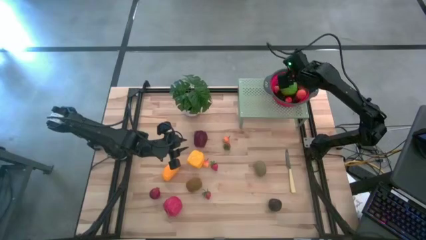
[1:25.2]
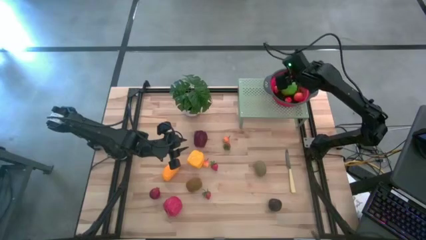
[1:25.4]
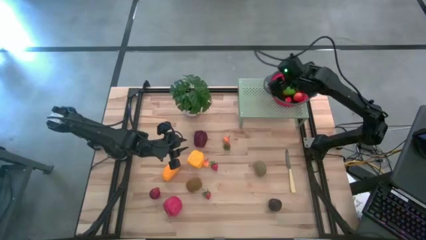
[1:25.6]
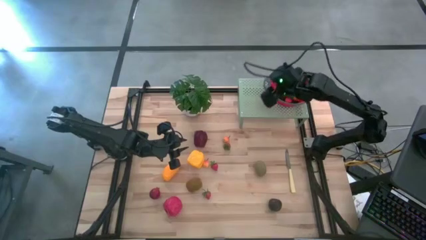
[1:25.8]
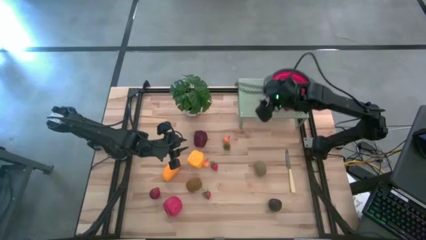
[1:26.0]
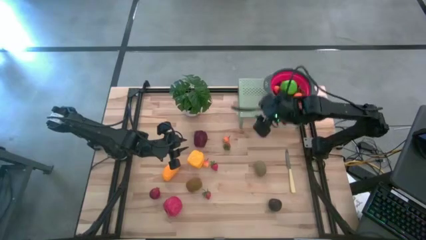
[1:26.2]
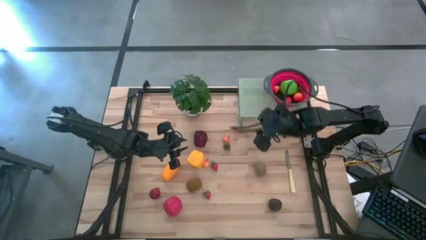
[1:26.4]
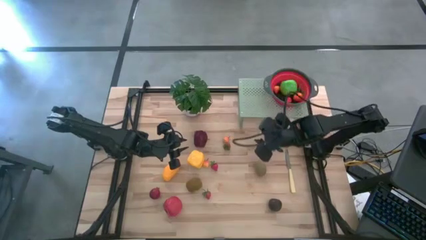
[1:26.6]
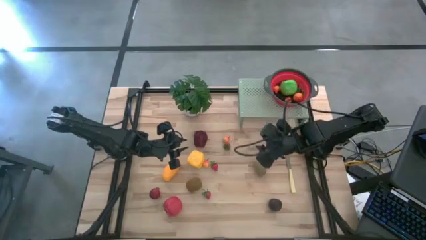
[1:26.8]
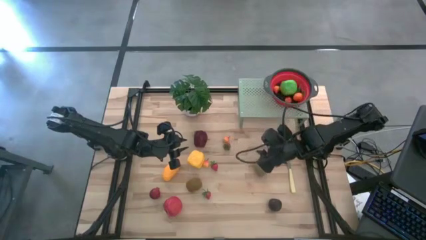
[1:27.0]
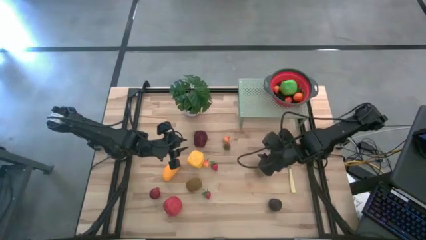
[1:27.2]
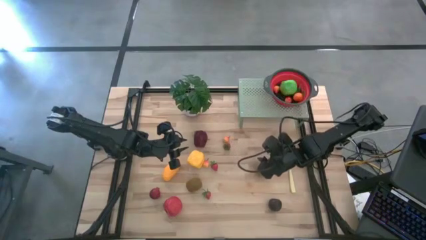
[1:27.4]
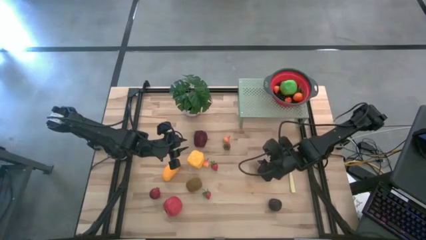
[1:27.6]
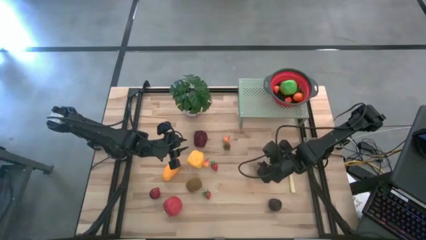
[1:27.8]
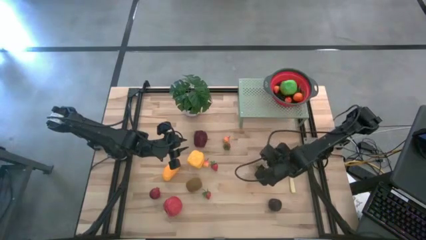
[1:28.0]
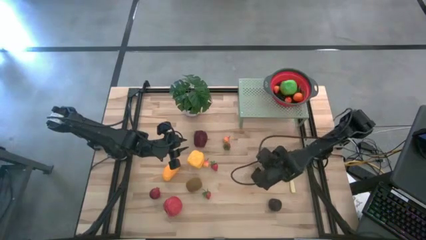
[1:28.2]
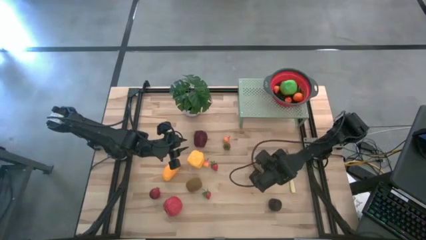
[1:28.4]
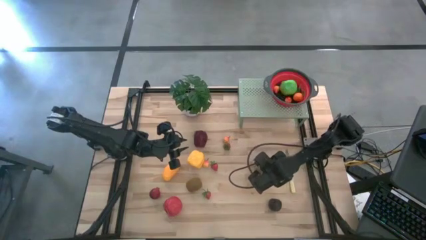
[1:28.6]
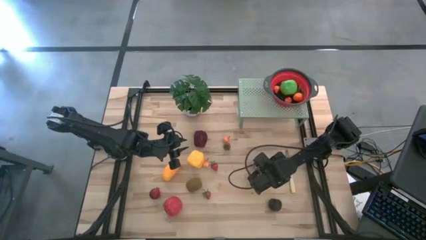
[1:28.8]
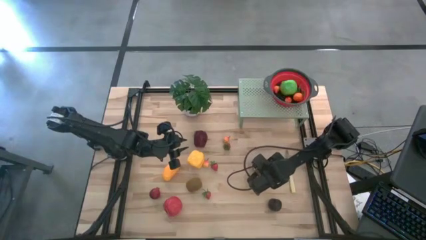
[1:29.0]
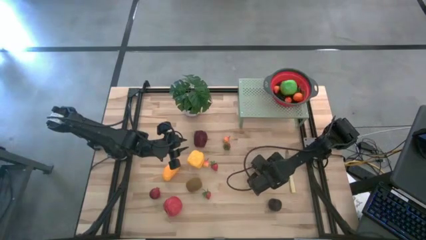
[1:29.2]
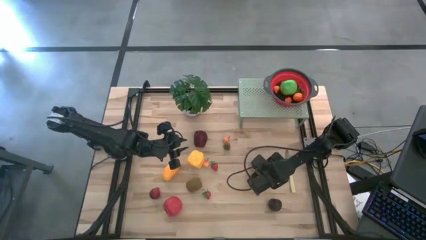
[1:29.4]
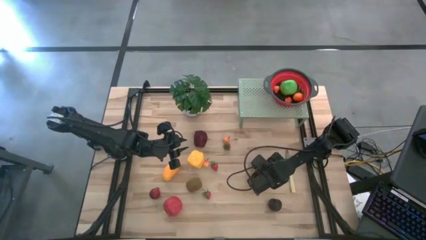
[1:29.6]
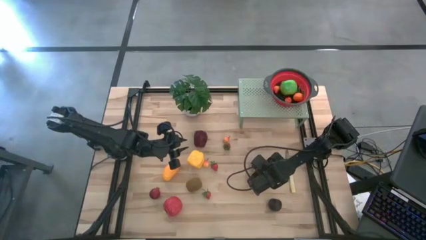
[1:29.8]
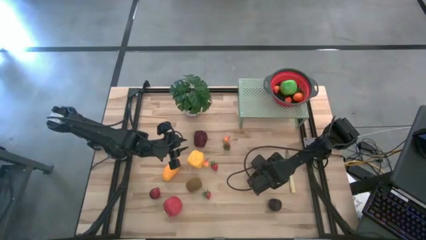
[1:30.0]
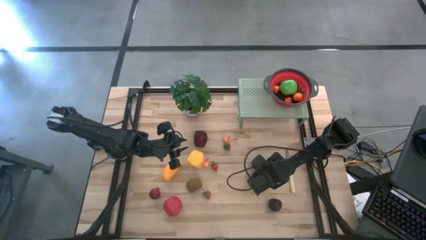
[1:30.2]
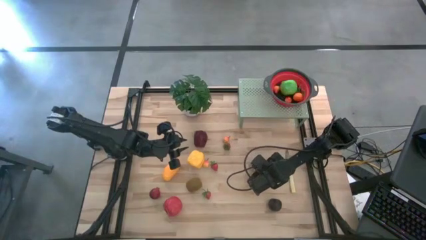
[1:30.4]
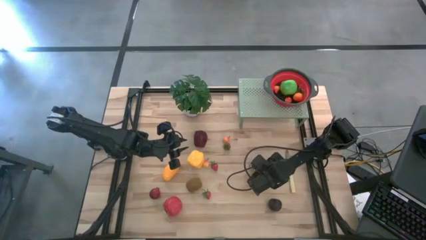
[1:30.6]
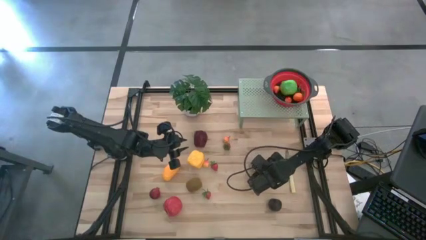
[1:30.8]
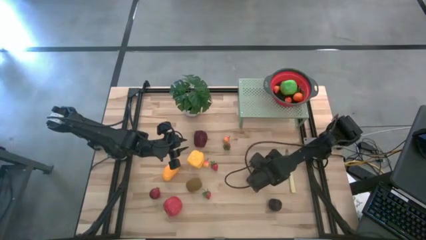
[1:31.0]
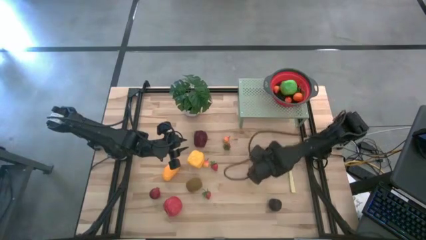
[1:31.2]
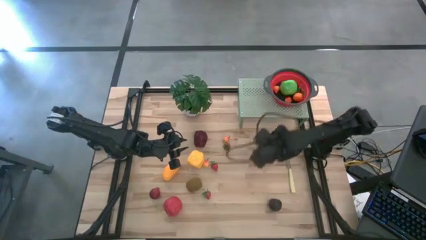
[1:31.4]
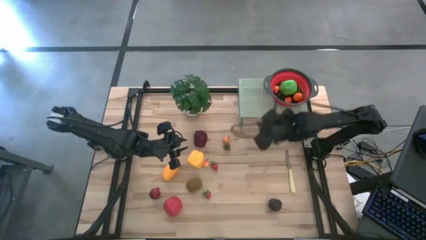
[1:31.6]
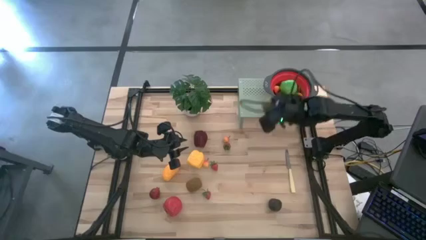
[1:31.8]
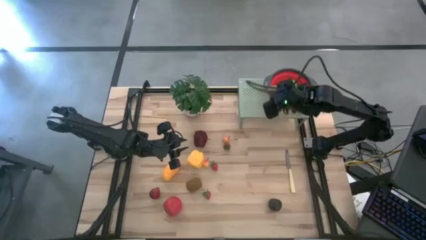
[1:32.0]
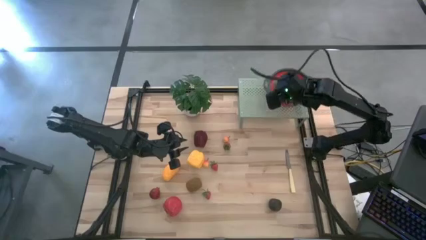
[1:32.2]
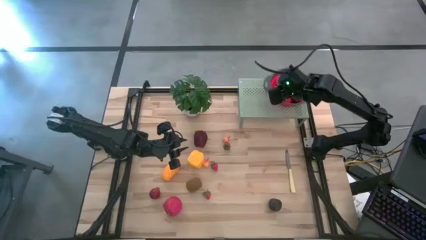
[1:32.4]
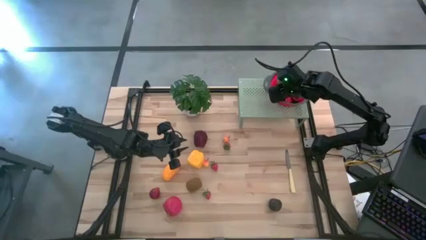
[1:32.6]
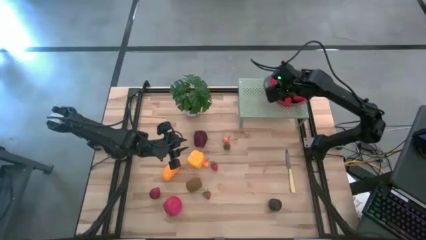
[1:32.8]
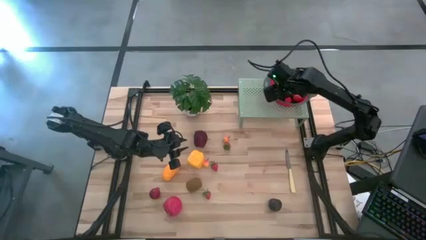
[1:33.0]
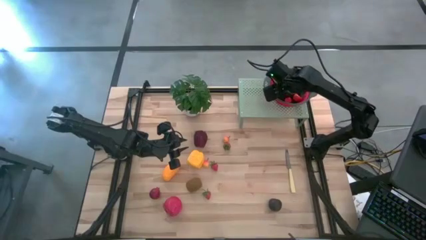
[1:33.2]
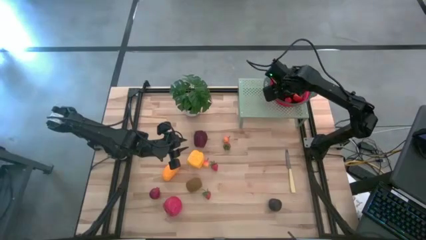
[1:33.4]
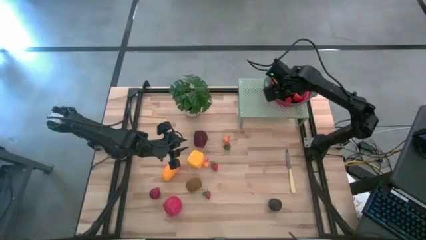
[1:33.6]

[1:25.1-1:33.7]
Task: Pick & Place Fruit
Put the brown kiwi into the red strainer bowl on the shelf

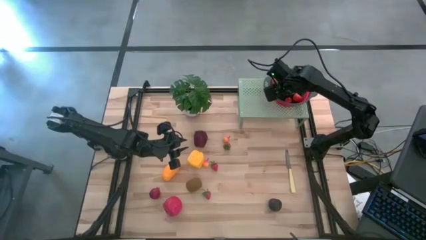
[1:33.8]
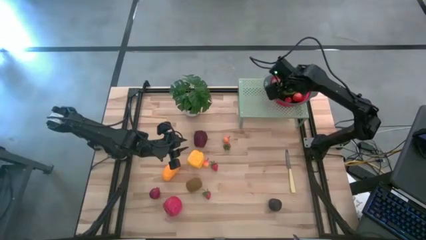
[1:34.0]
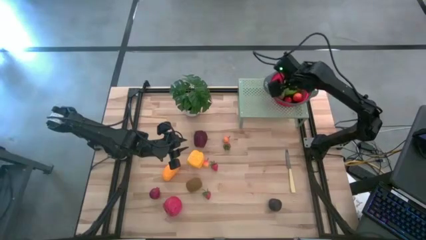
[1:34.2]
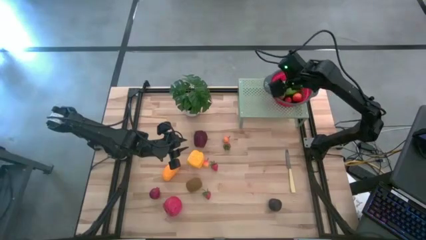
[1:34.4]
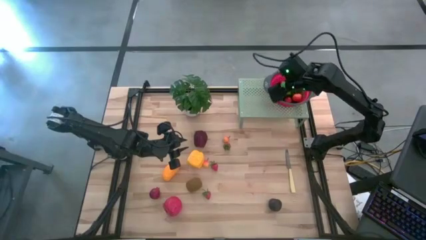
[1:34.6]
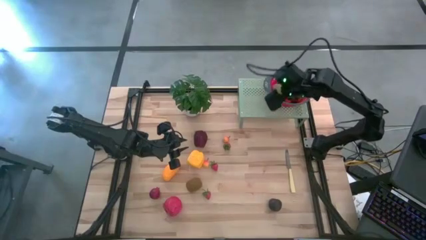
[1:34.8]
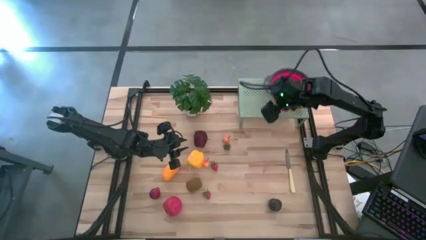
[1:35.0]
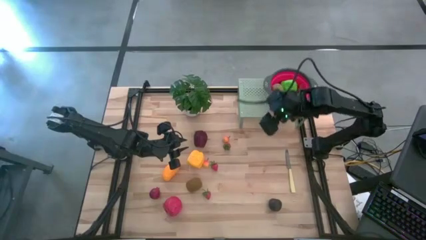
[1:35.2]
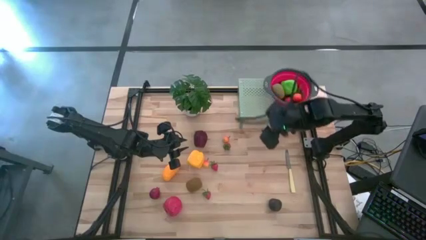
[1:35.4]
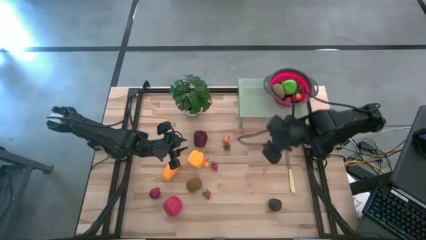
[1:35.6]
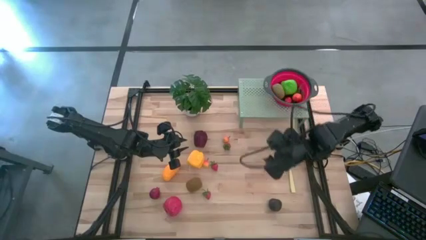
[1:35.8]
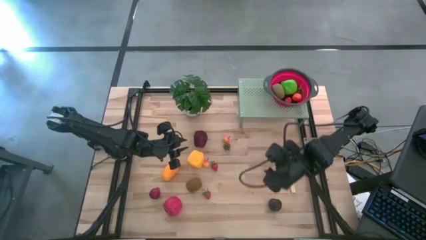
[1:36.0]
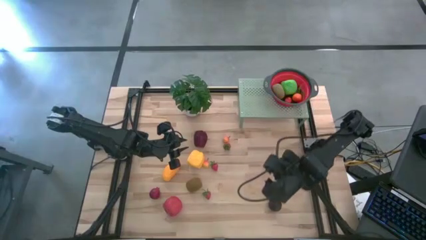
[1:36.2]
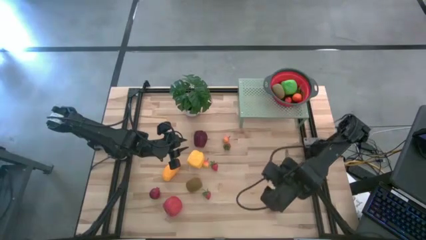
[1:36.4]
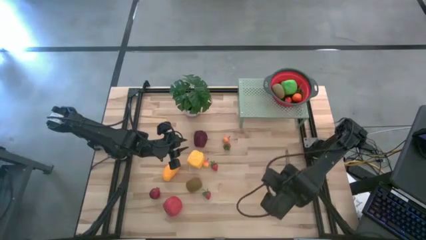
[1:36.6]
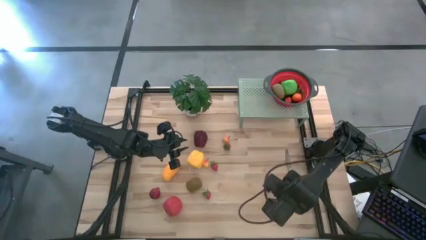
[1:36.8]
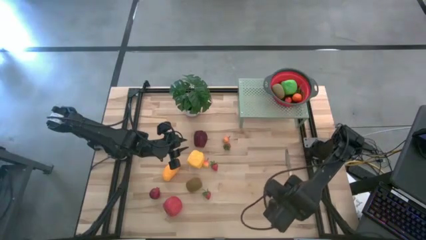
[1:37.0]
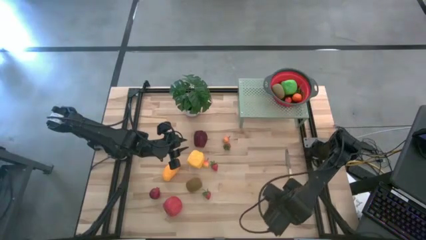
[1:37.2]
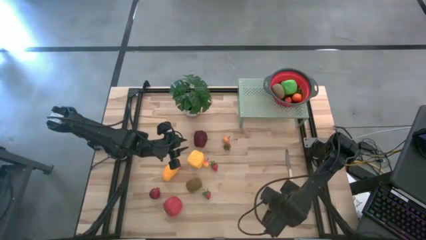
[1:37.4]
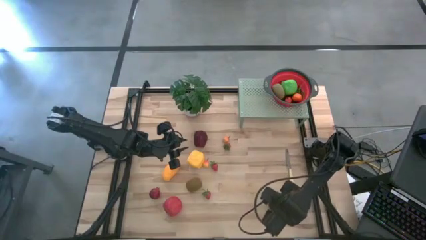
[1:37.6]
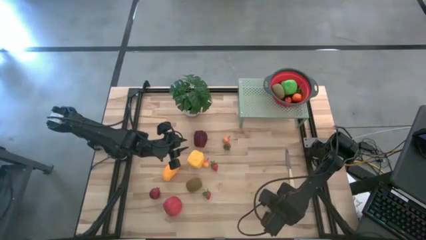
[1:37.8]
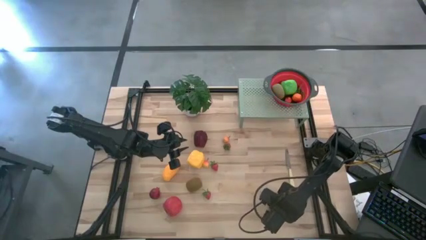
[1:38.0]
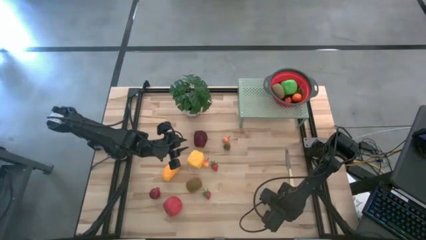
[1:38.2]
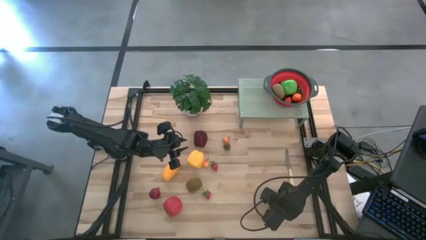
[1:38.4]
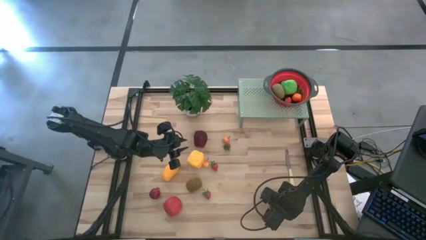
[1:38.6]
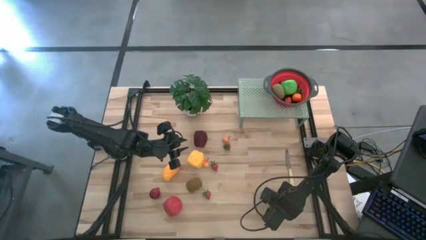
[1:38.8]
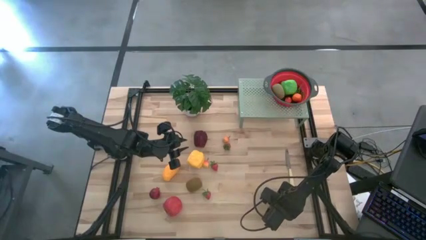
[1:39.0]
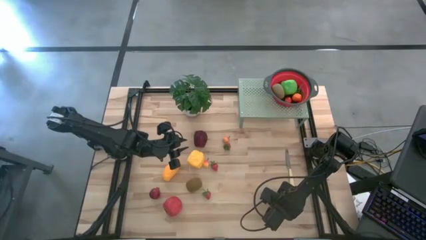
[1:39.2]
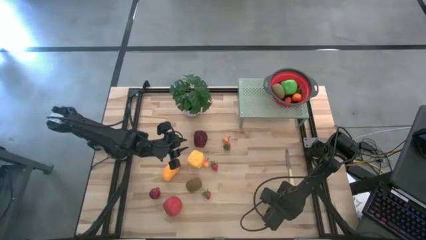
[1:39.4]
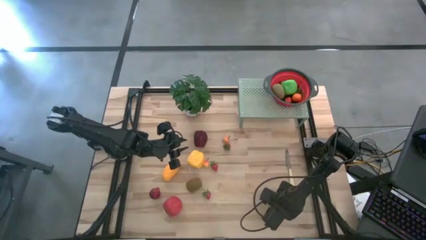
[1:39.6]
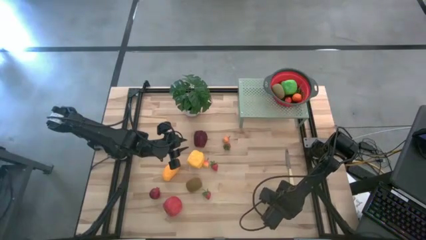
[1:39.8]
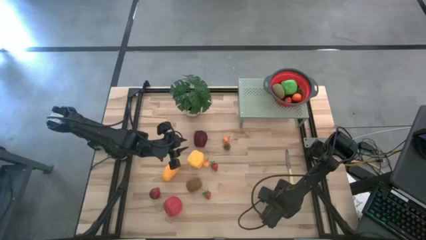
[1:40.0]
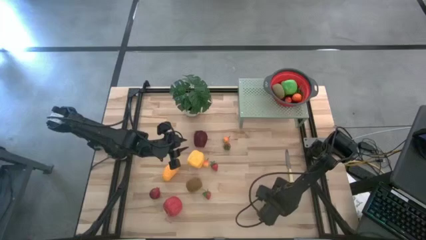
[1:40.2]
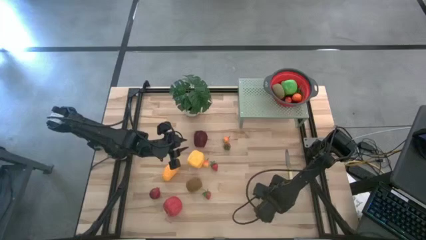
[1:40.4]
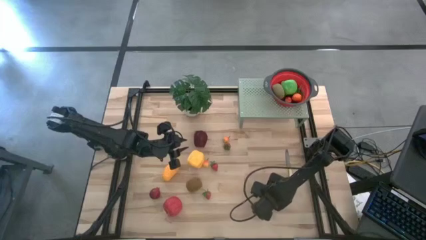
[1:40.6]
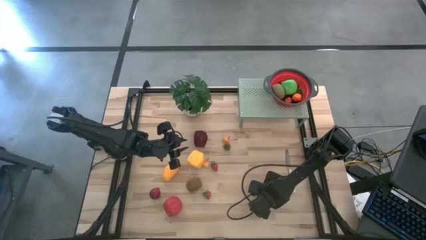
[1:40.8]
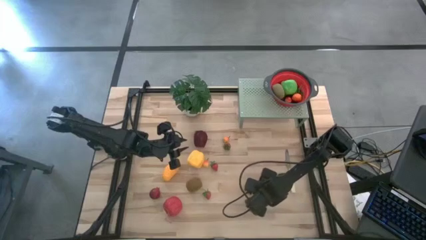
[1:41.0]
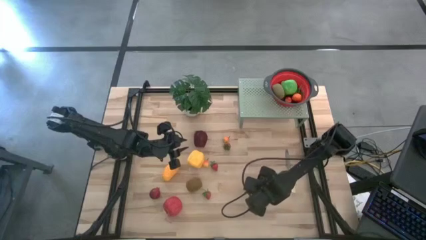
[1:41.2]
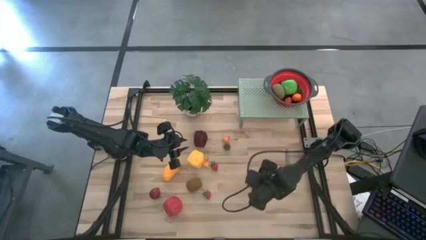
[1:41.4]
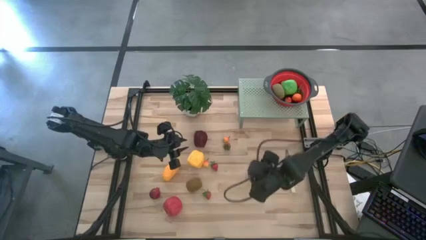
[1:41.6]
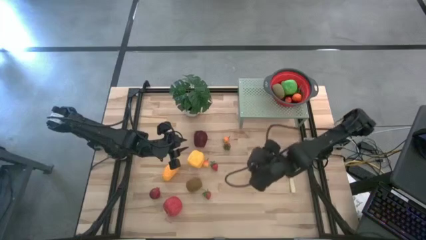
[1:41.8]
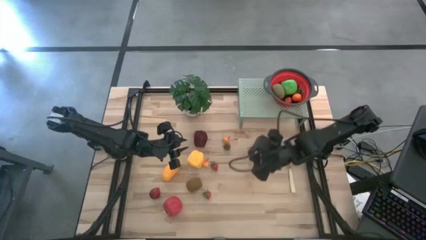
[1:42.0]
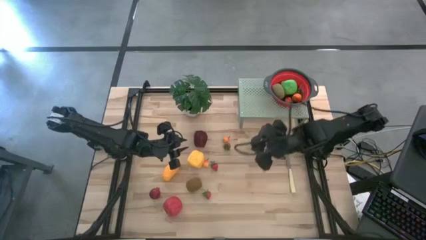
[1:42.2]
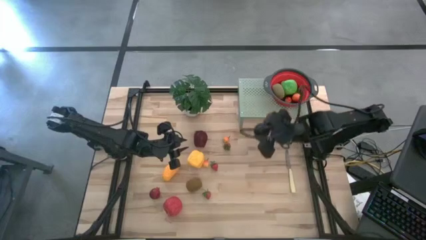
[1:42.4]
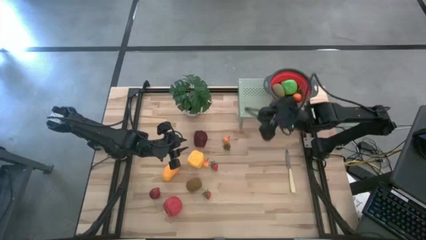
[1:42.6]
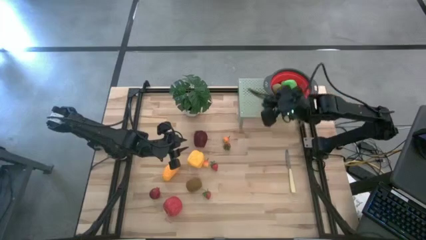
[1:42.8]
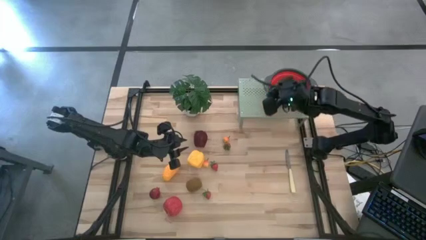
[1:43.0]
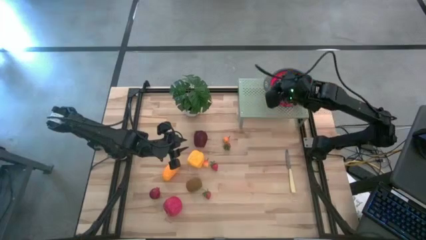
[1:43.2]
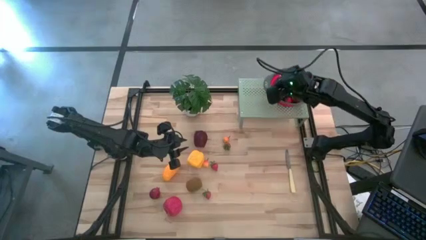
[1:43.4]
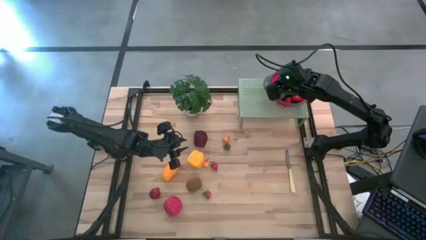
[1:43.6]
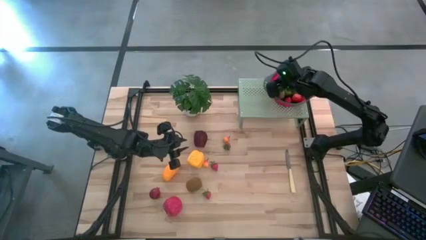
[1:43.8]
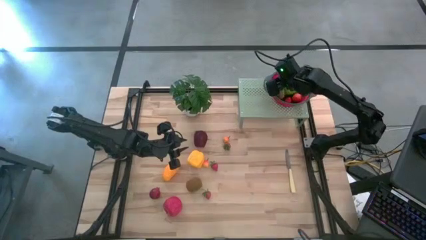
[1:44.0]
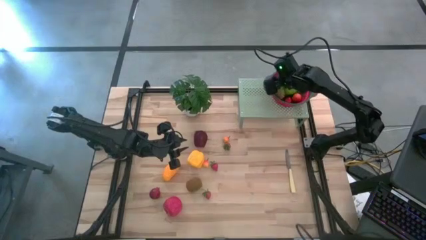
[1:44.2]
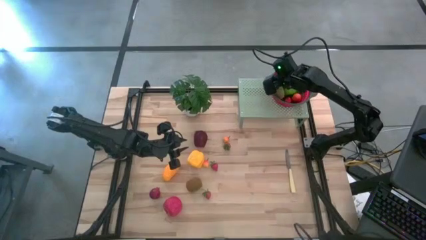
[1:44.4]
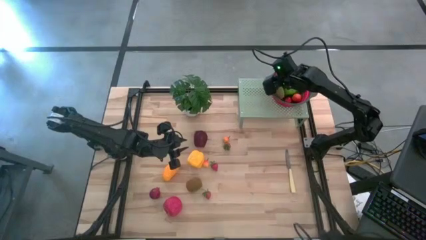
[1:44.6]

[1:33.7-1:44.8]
Put the black plum into the red strainer bowl on the shelf
